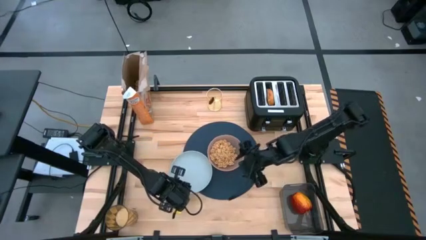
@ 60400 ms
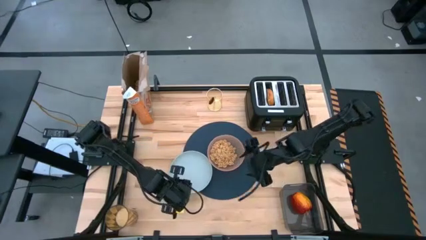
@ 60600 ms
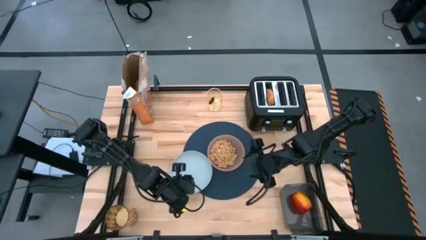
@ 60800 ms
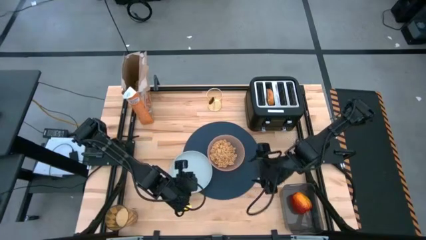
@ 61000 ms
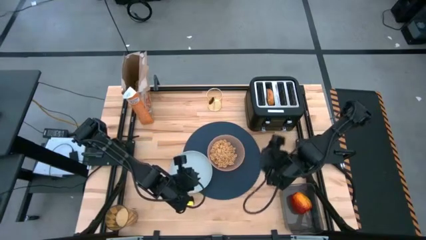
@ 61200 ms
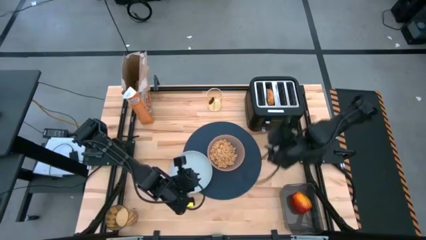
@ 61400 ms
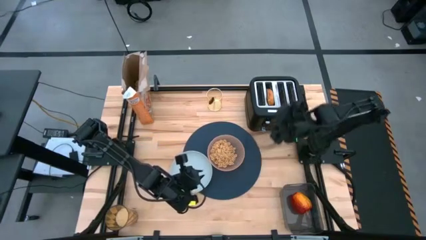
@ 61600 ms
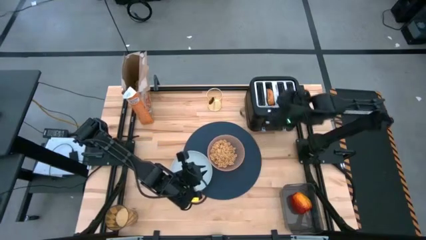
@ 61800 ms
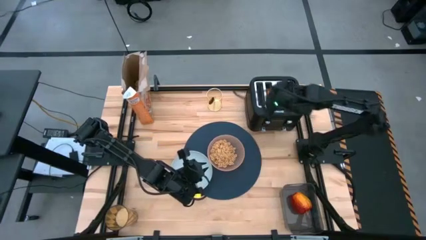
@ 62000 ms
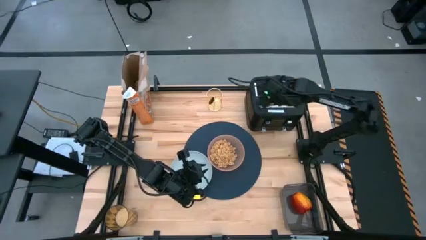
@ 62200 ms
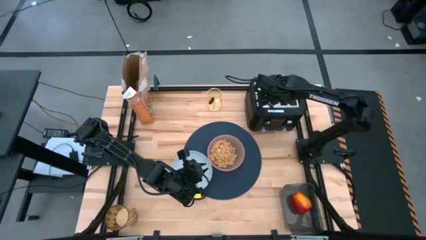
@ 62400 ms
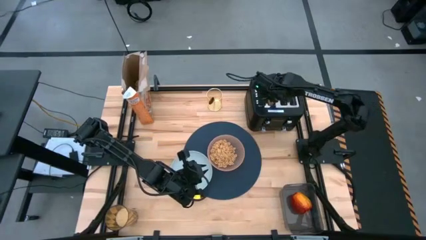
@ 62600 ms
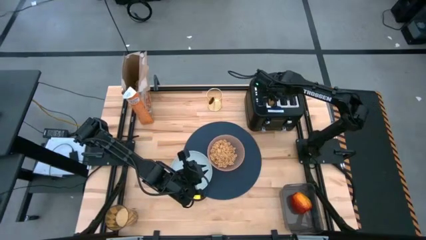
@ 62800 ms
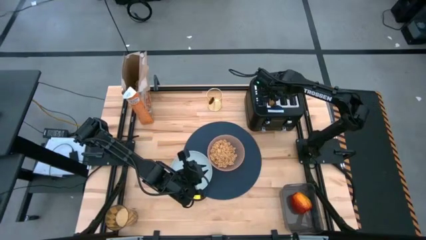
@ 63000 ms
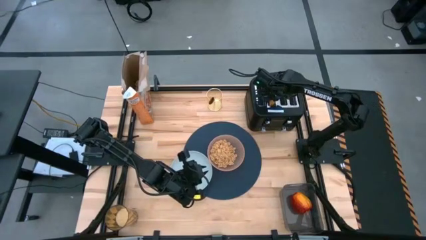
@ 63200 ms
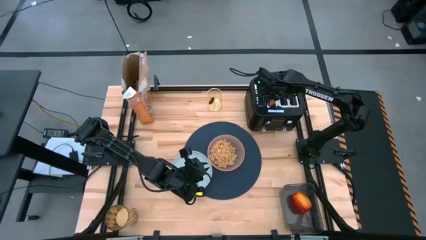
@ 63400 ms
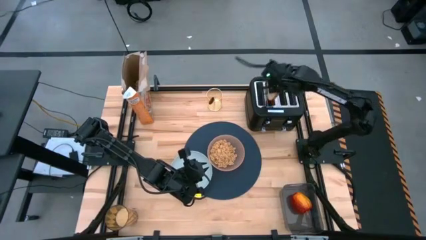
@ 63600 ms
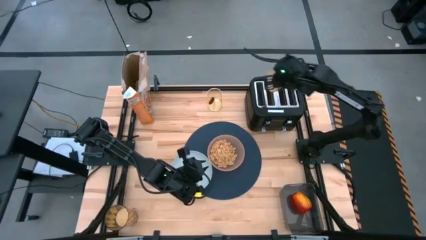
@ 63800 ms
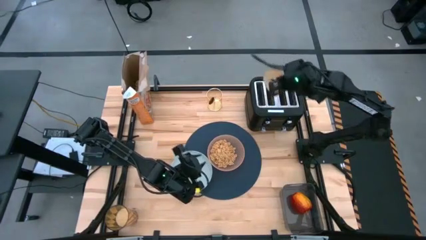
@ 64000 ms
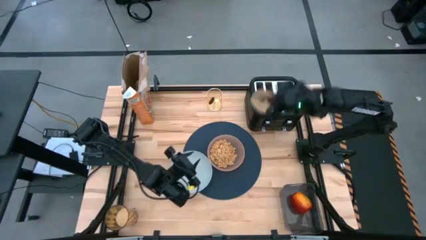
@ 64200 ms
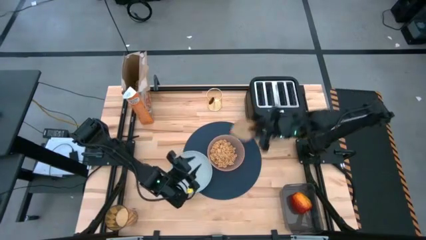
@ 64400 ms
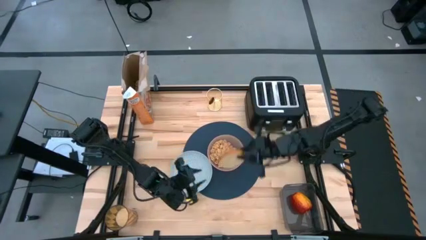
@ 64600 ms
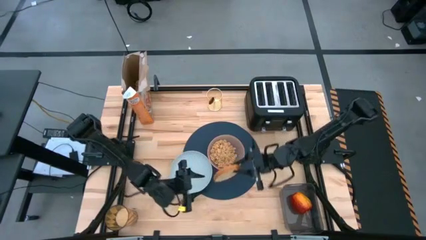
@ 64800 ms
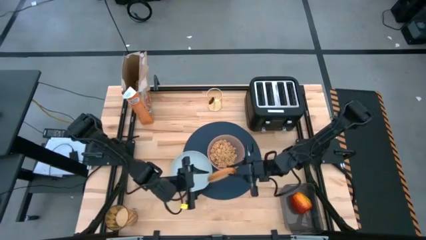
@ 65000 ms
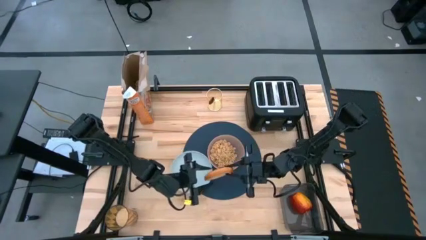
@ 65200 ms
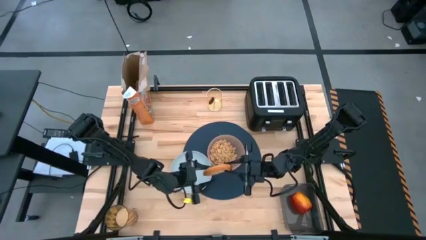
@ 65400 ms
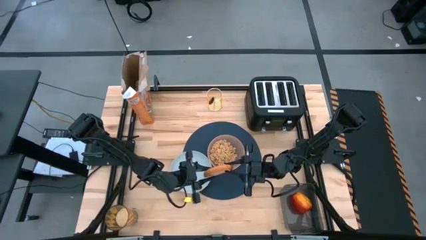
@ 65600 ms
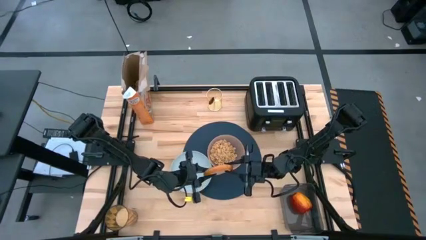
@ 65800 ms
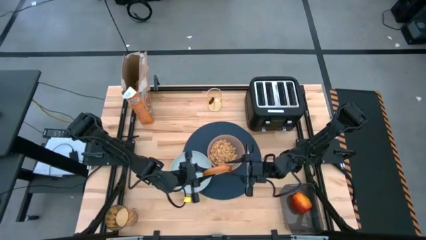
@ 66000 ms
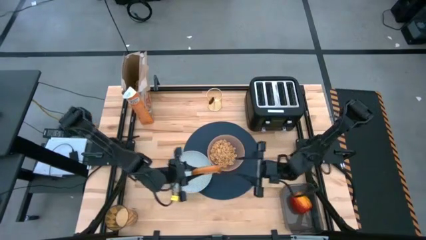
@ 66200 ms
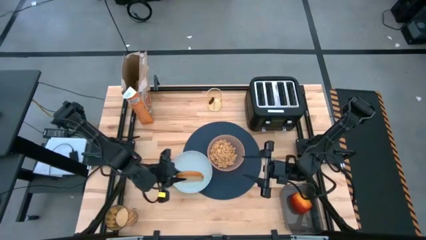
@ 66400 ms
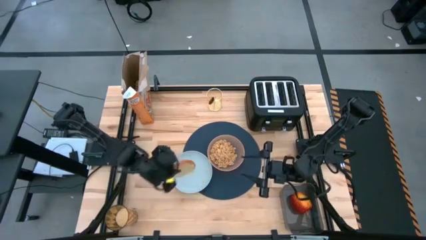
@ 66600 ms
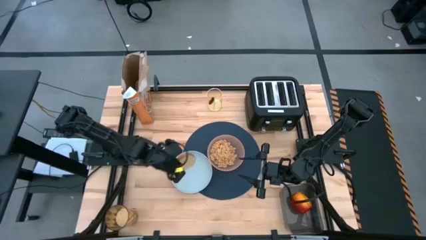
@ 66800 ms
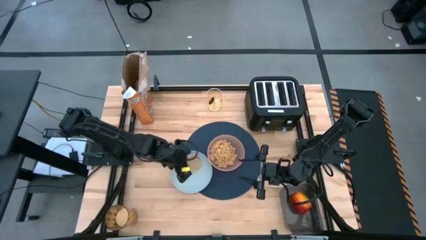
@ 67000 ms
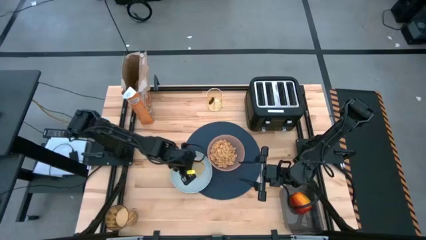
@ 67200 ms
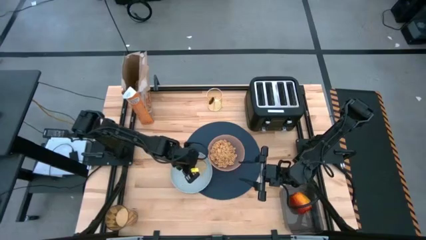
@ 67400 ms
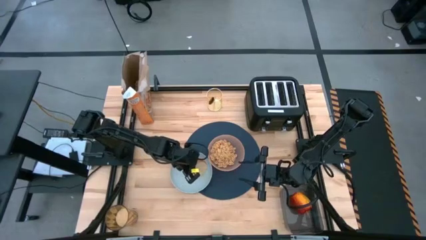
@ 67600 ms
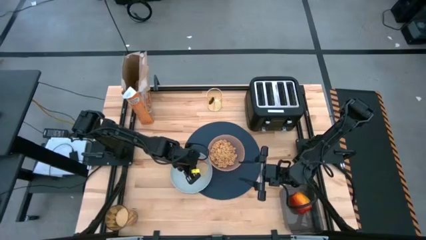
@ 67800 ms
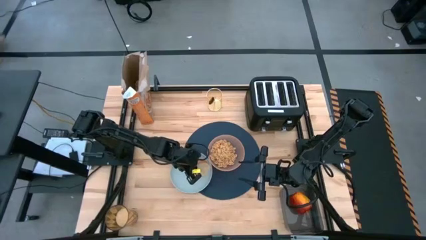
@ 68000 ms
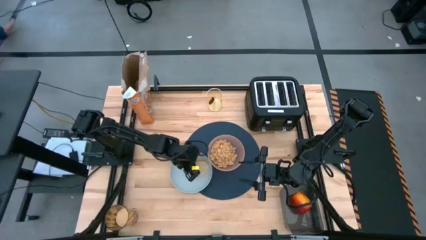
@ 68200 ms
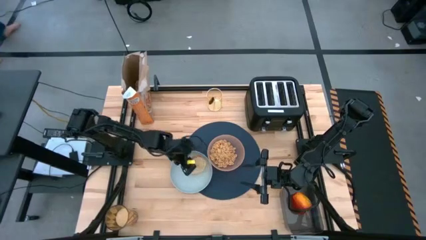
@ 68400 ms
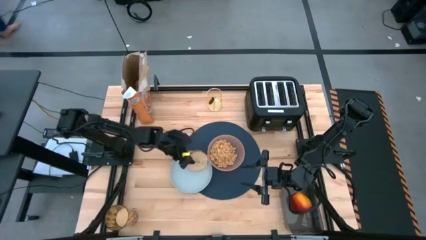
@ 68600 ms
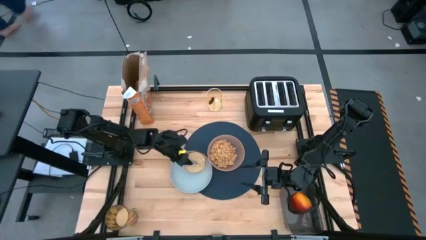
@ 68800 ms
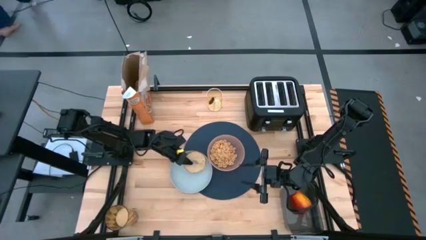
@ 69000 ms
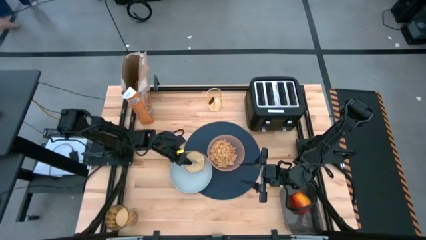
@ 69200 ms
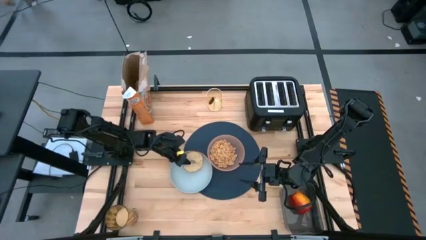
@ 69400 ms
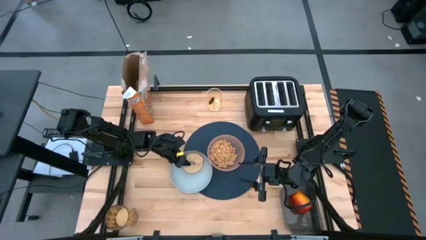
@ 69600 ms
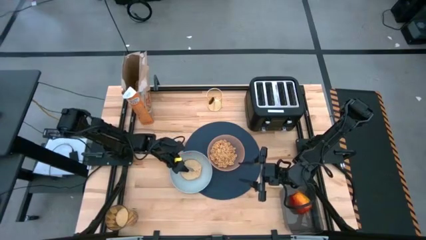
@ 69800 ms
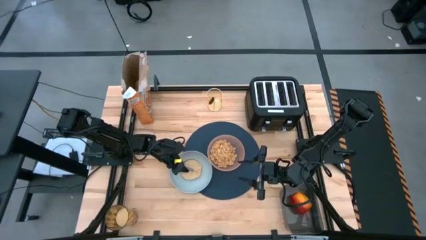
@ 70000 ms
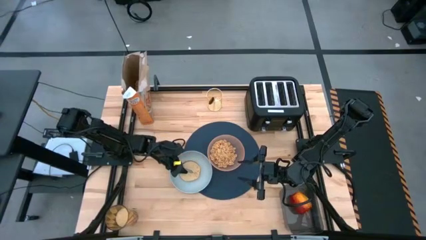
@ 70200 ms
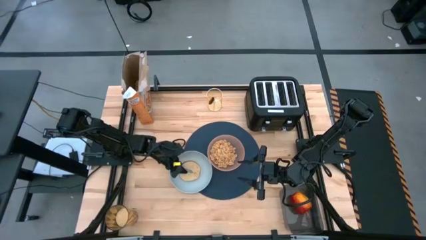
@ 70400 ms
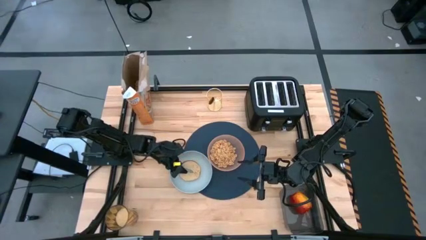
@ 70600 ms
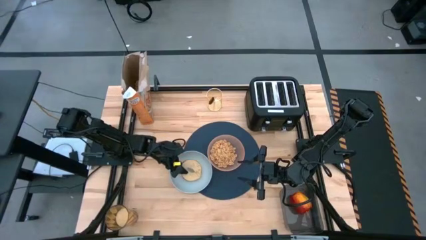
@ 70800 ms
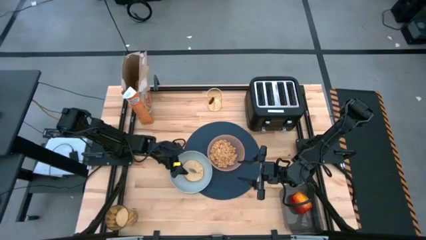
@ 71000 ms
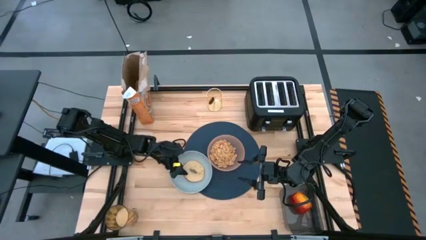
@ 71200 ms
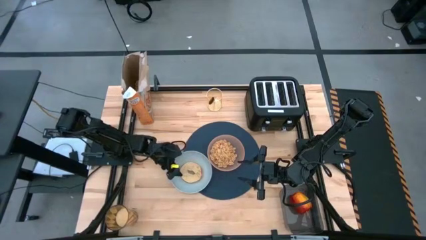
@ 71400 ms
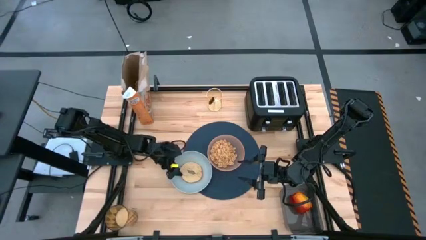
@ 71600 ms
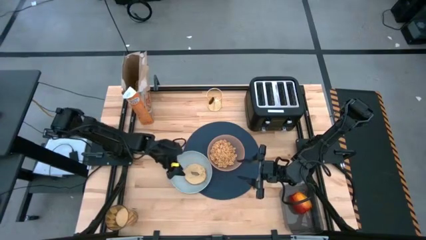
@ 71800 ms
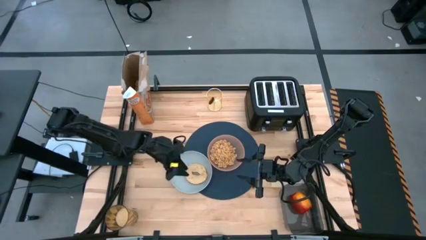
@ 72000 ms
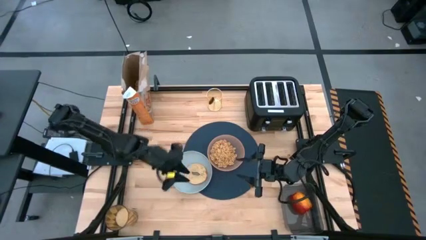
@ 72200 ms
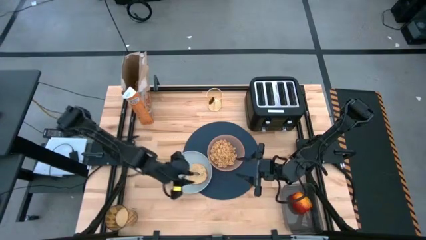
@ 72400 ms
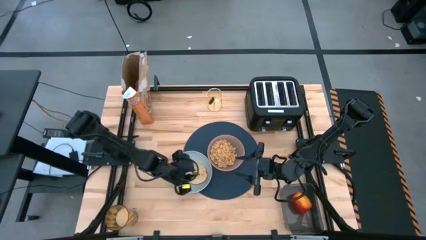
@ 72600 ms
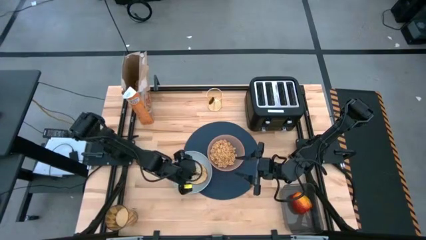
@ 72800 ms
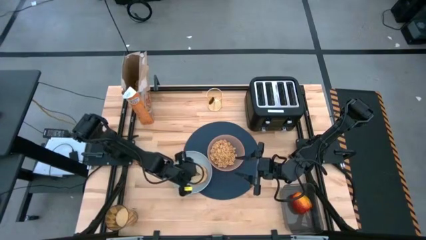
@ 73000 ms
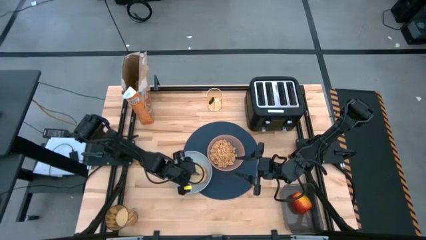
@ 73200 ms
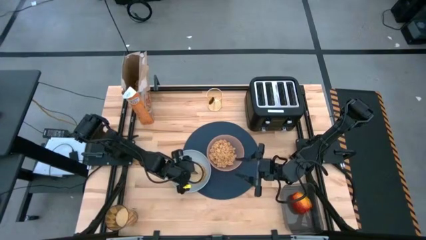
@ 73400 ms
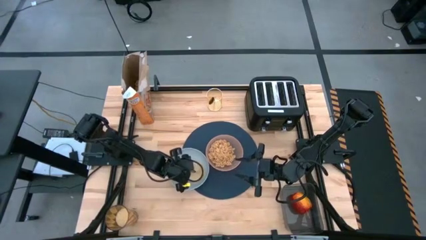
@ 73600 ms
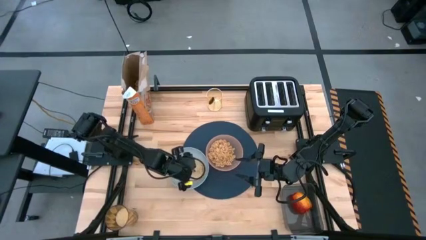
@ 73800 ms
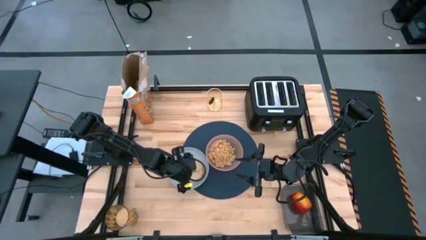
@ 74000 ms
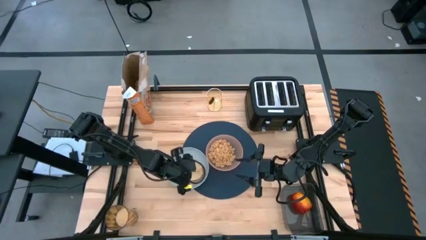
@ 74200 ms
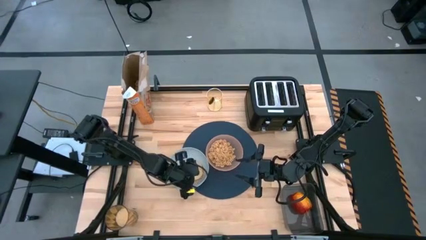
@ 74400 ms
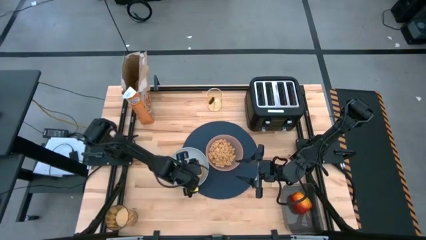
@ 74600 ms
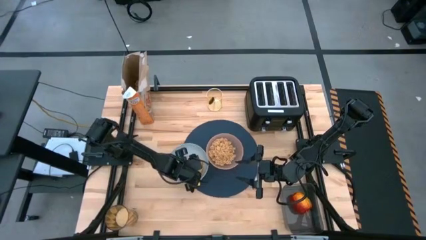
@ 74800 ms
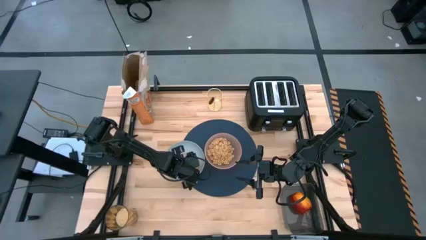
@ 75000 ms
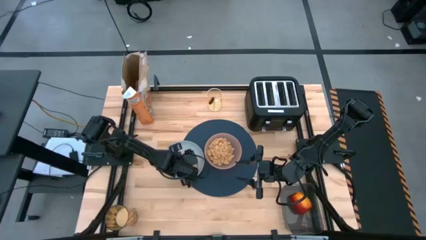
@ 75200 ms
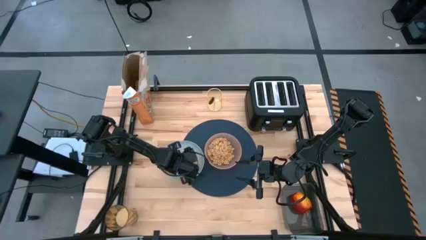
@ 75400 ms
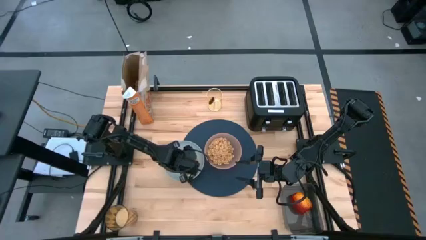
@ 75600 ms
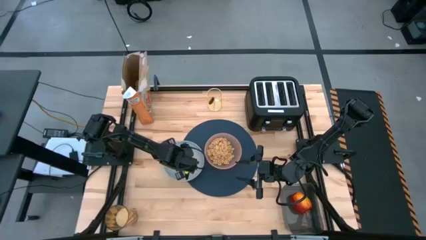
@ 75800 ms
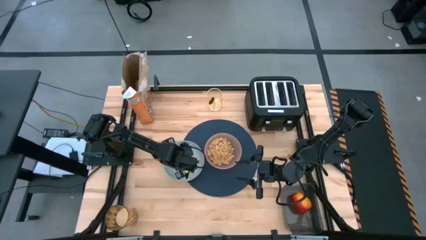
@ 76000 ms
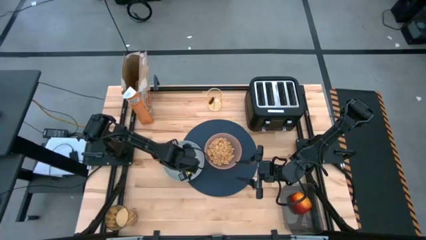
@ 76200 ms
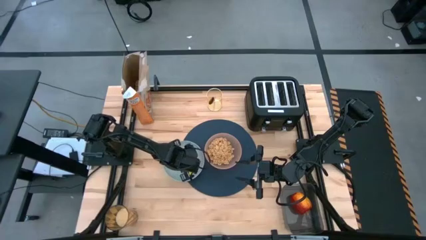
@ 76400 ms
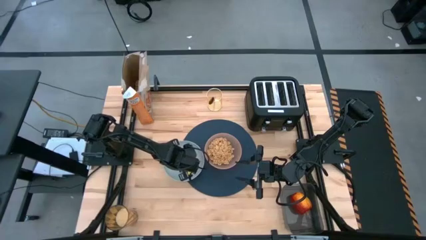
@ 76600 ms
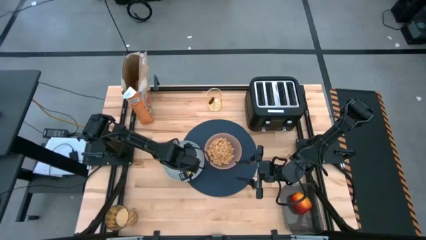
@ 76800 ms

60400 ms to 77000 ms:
Task: Arrange a breakfast setting
Put the toasted bagel from the toaster on the gray plate
